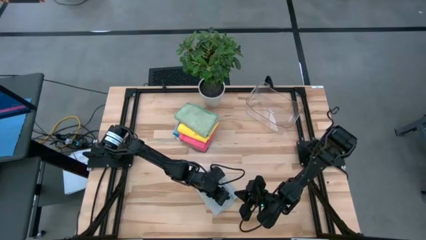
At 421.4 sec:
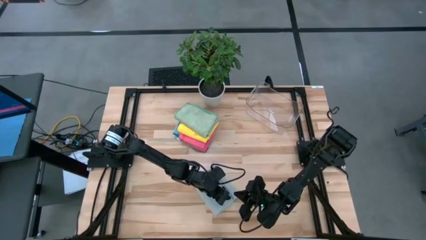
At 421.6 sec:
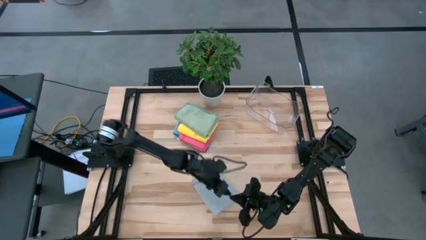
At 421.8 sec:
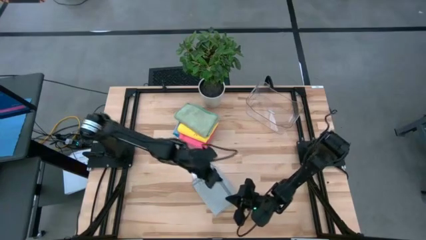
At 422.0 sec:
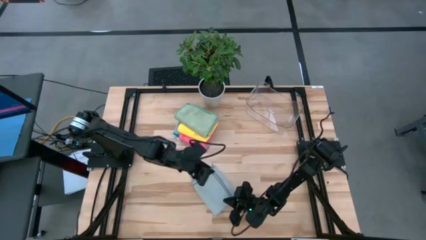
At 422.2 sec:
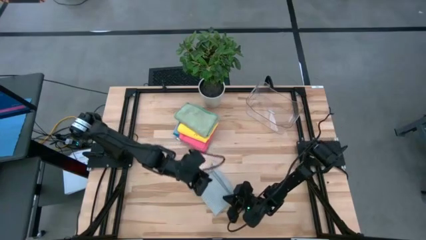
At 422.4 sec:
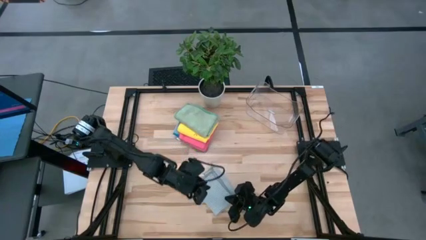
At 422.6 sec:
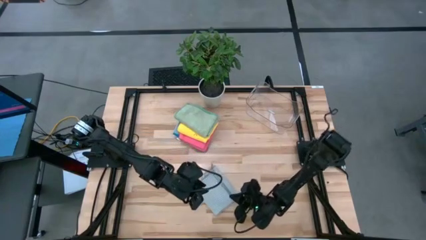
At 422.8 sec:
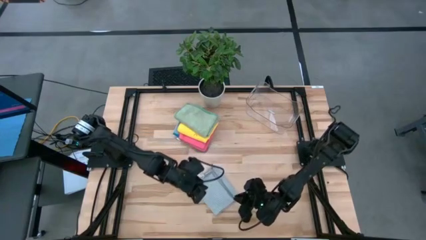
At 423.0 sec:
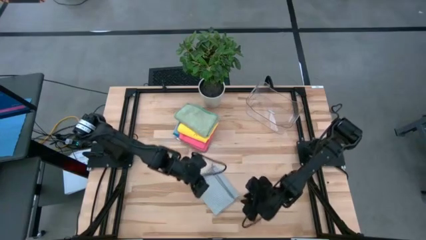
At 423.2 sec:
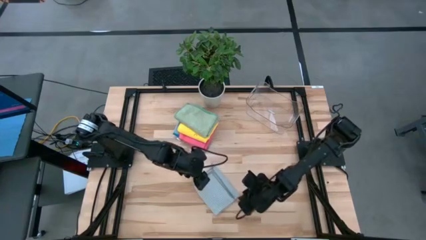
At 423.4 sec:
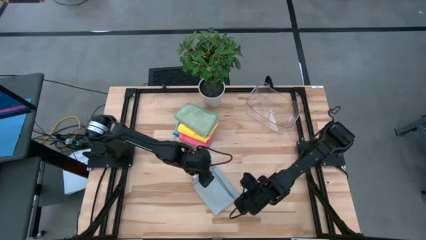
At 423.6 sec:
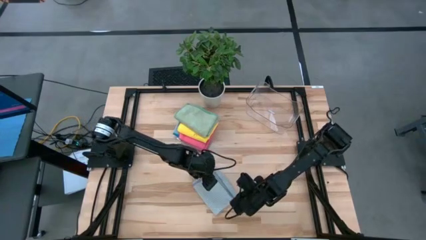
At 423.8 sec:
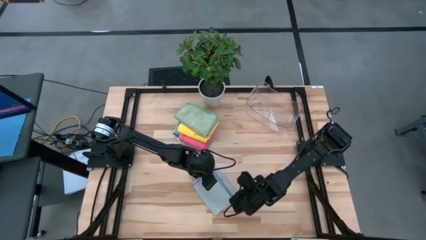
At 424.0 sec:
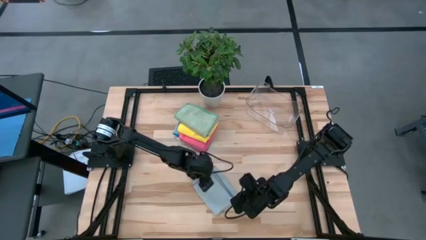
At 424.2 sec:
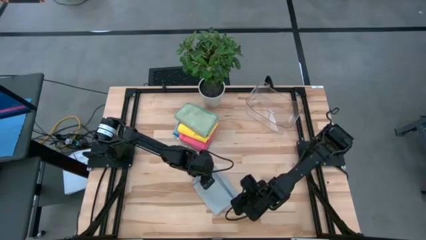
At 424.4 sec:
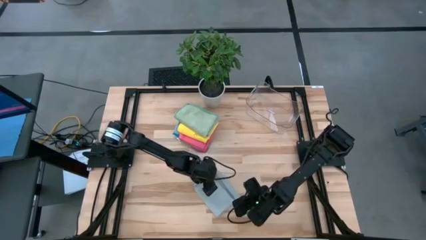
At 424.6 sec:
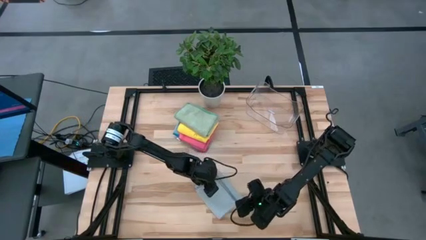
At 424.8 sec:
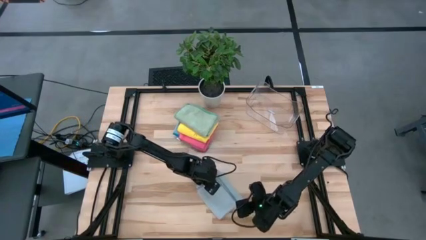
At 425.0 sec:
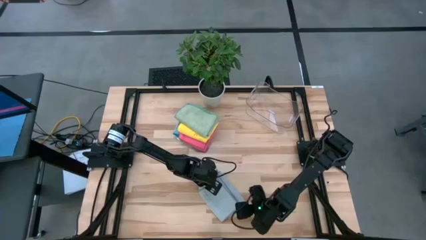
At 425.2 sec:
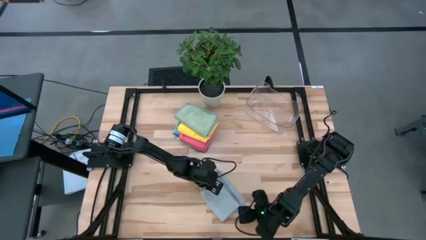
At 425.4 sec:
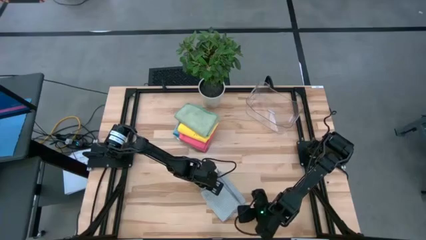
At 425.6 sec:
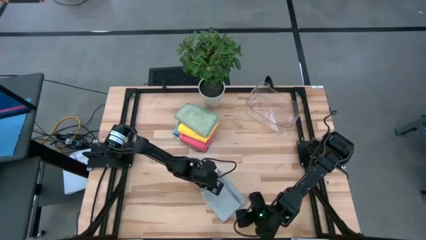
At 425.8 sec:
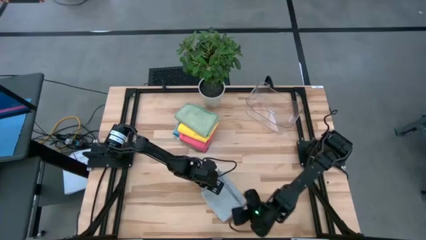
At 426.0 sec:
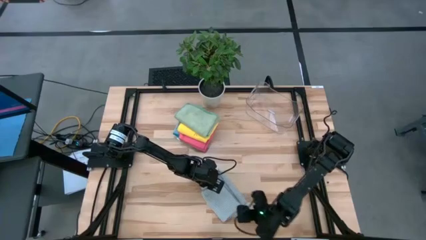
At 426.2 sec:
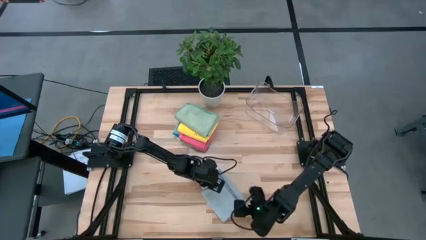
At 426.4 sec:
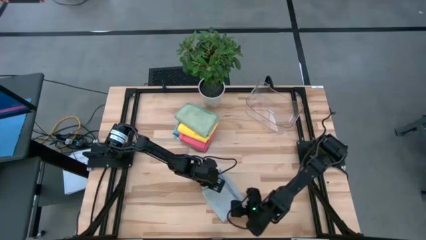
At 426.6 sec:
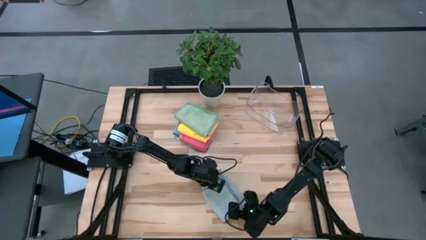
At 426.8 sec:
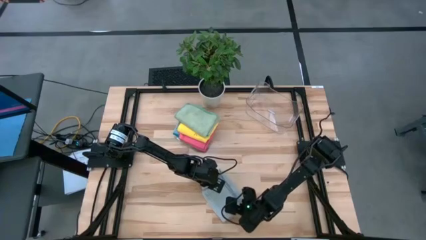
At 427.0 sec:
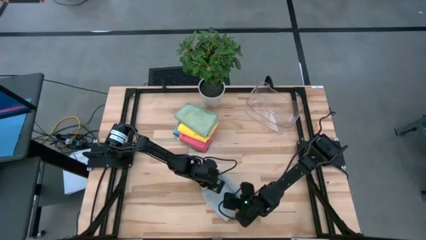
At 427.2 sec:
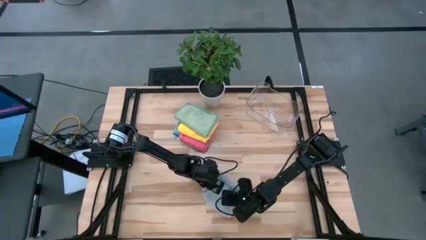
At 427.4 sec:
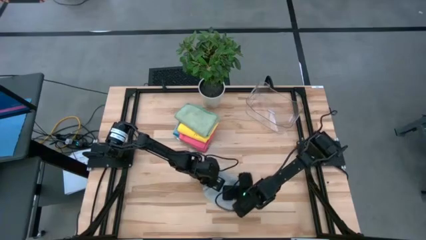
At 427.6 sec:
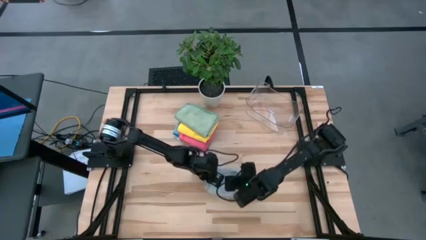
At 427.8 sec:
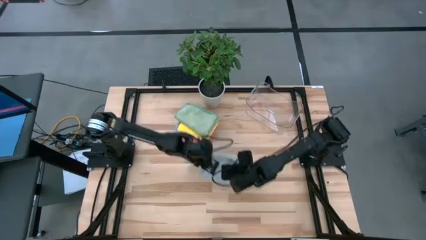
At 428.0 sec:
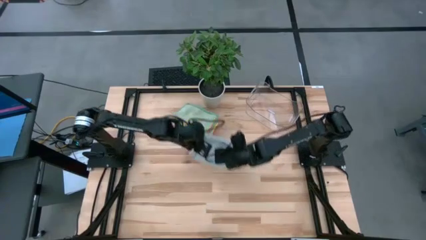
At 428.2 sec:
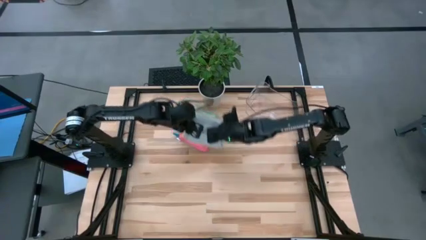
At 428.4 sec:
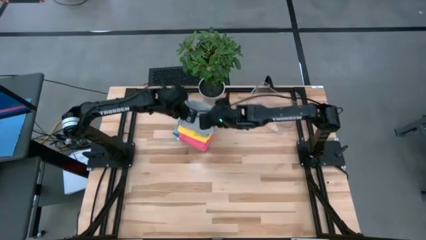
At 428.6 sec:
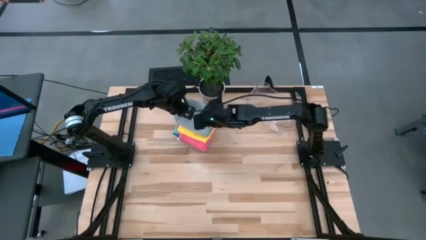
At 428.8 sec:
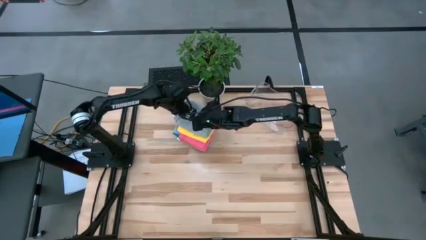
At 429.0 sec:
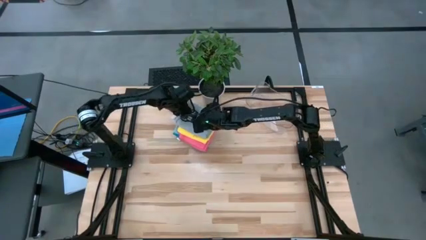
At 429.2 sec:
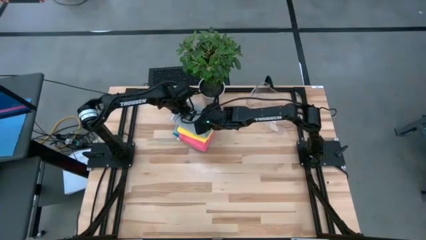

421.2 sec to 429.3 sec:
Task: Fold microfiber towels
Stack the gray towel on the light green microfiber towel

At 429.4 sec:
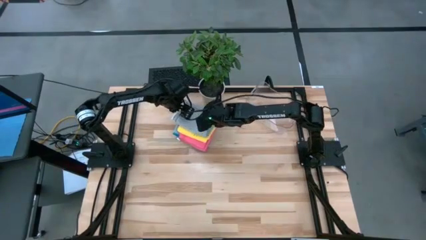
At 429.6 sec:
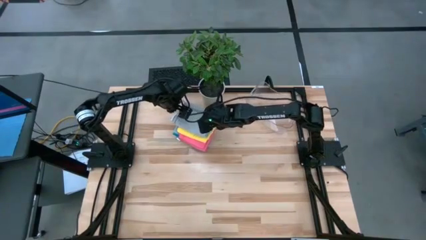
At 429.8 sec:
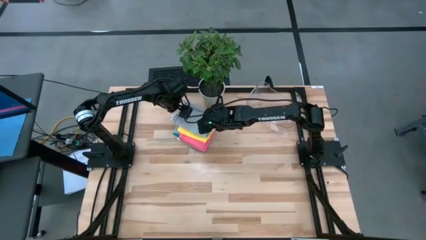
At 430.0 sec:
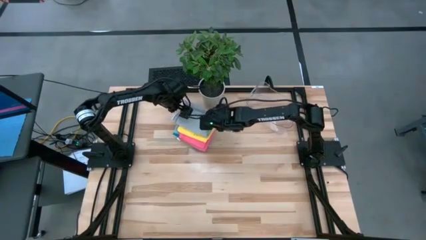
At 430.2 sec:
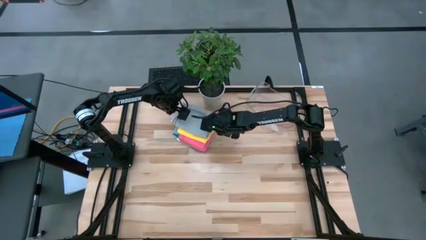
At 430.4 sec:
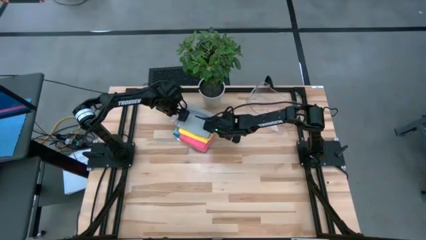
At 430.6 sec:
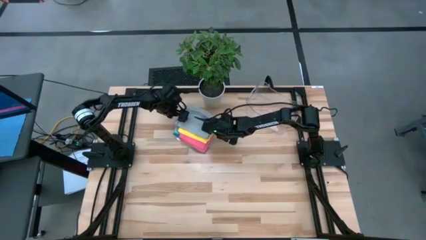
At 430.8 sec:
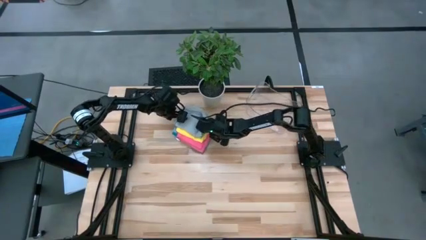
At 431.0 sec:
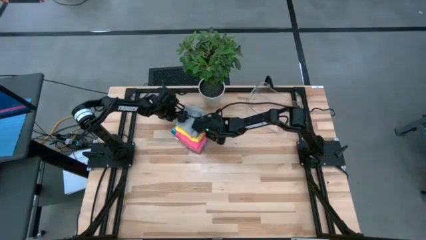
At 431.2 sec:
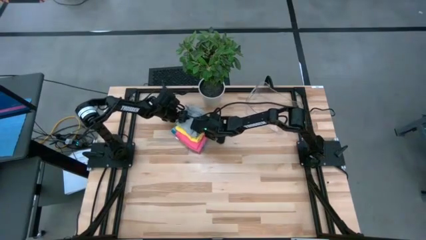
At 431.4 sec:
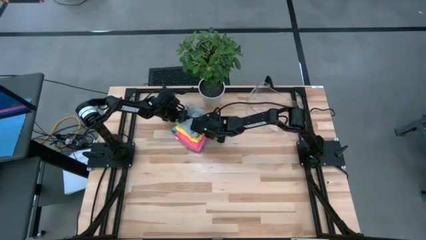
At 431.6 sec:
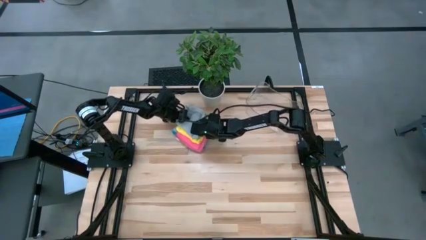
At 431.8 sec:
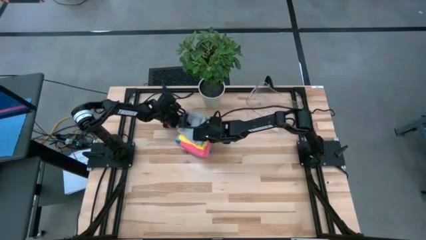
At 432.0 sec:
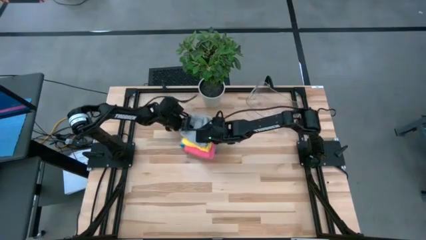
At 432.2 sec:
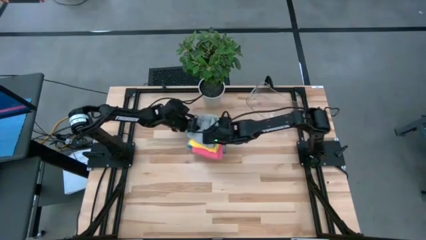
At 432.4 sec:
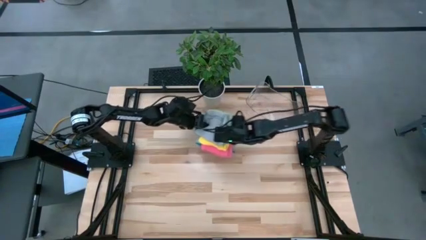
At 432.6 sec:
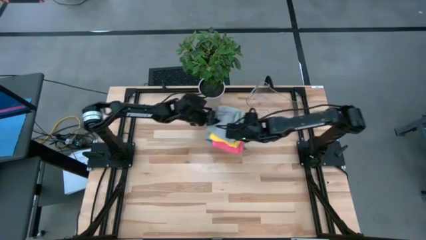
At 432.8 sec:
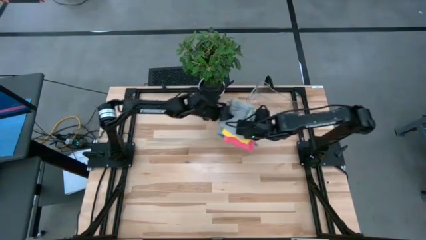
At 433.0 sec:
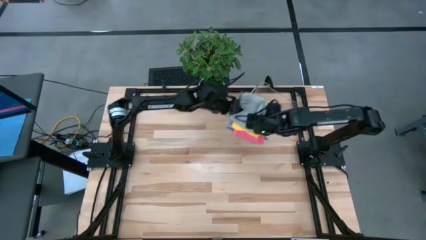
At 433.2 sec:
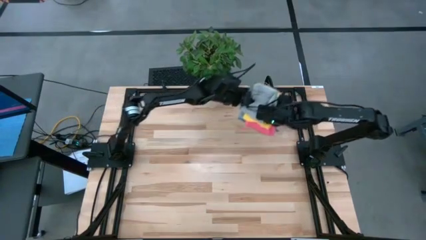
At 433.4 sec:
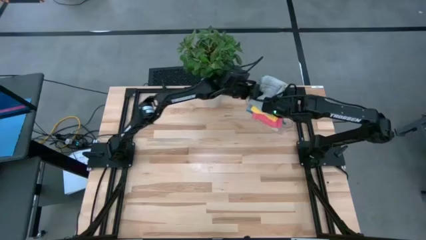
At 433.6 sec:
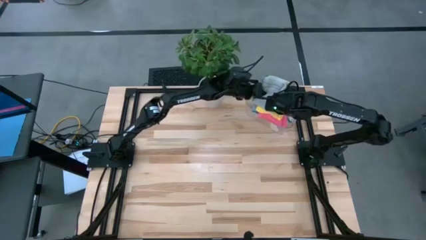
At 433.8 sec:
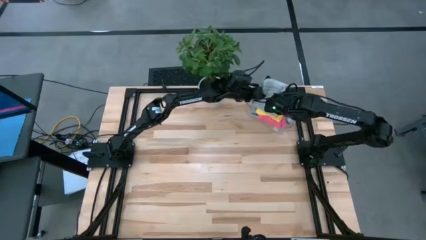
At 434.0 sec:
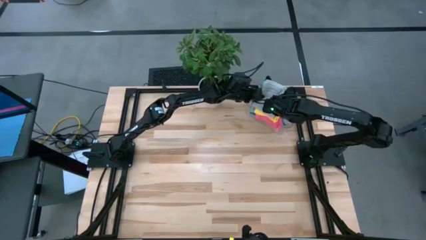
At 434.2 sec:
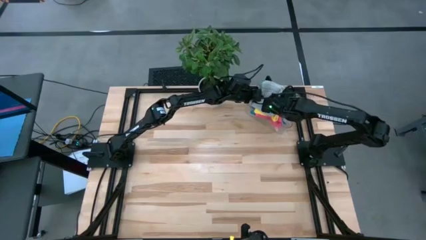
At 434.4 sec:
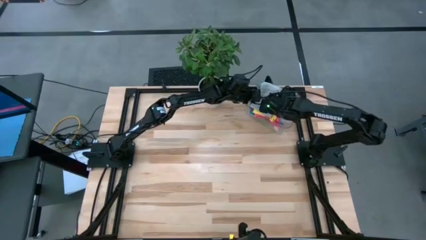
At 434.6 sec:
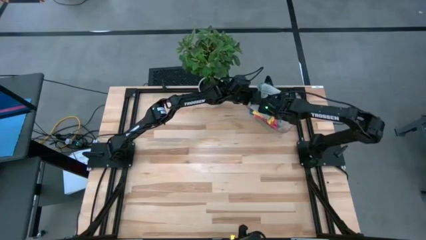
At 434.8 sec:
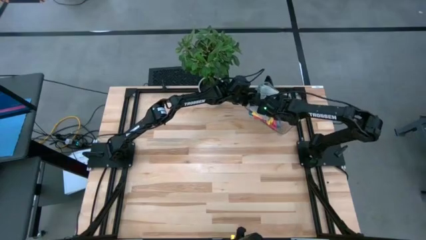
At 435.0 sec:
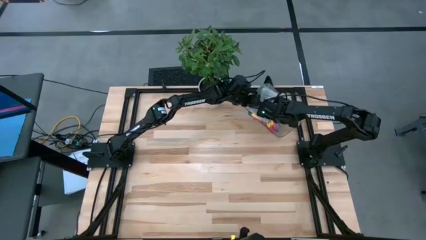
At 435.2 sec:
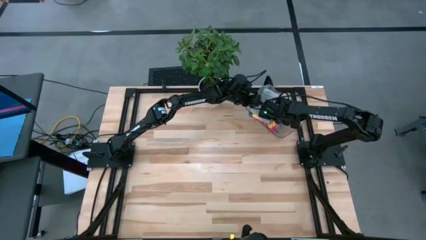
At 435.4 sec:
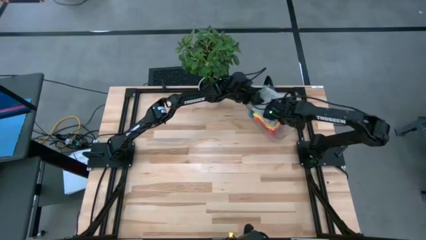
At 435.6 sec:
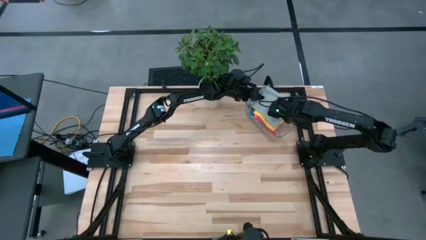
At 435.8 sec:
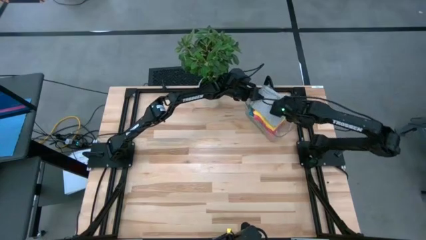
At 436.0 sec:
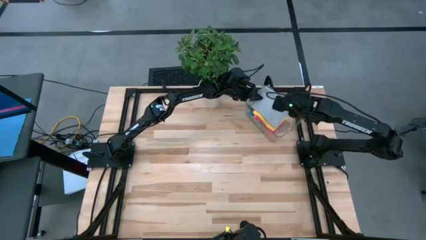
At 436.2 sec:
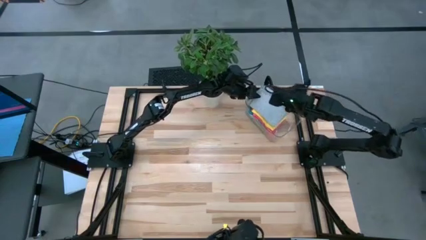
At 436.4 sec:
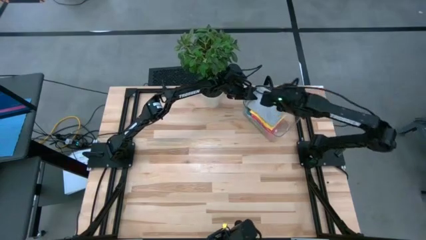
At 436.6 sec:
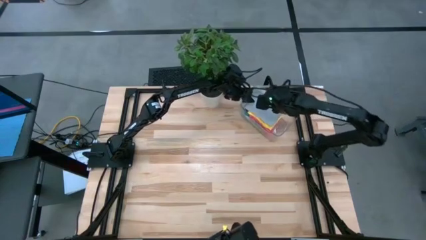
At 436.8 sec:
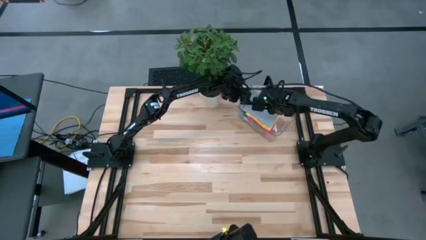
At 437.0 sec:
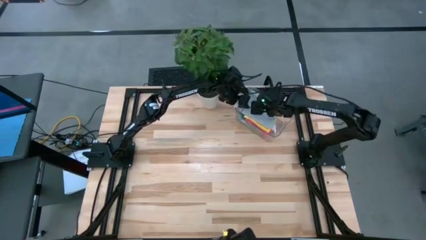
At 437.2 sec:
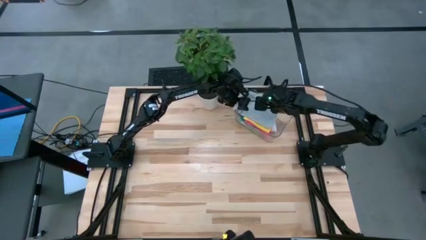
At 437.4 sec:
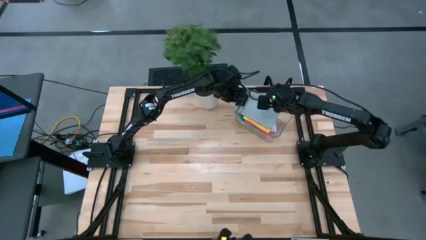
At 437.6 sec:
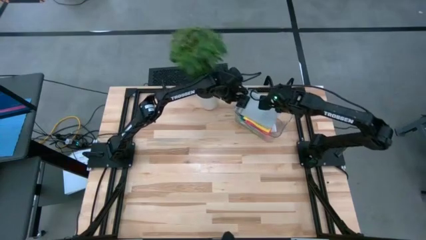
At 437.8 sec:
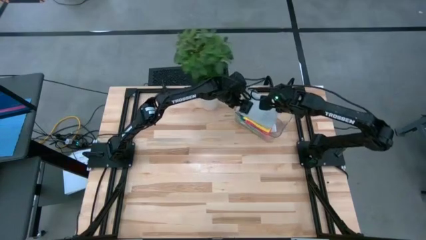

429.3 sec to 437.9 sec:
Put the stacked microfiber towels into the transparent bin
